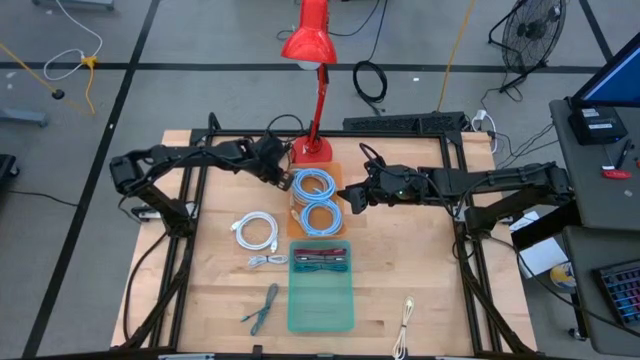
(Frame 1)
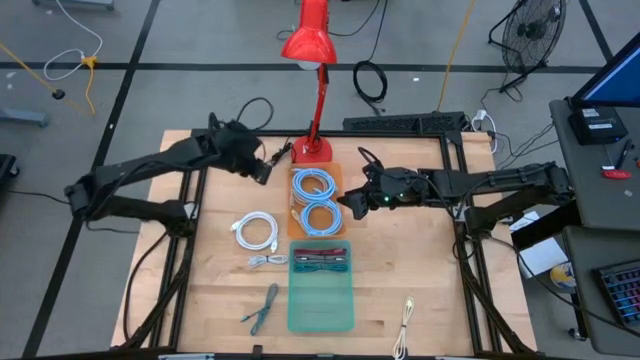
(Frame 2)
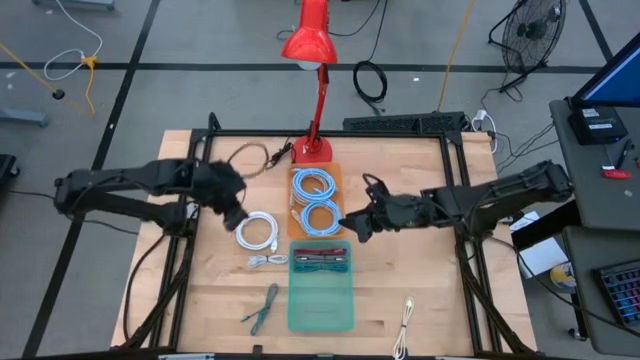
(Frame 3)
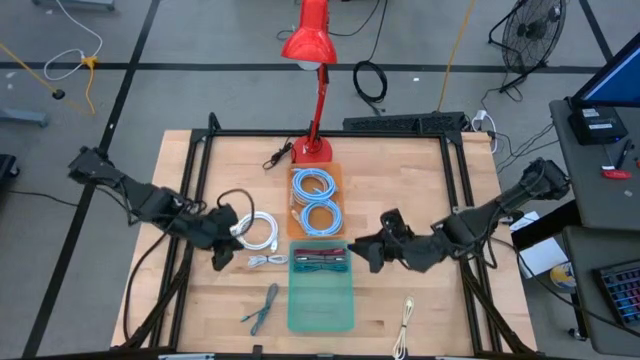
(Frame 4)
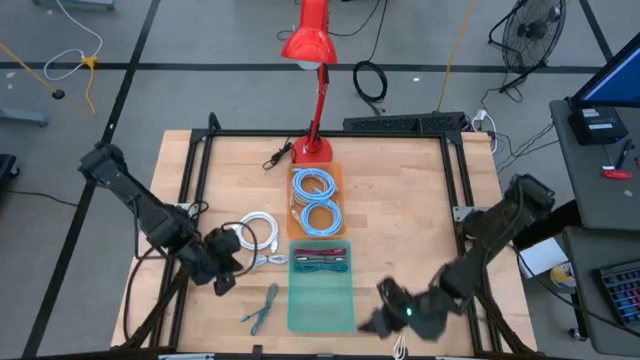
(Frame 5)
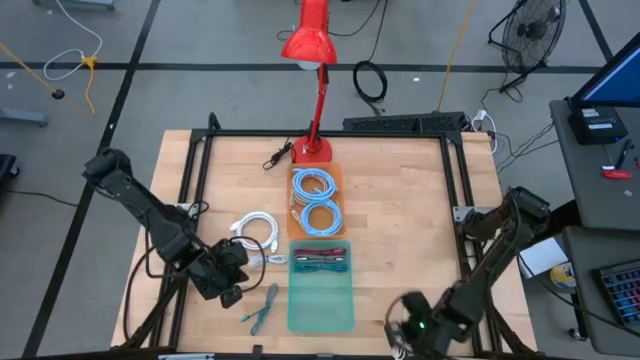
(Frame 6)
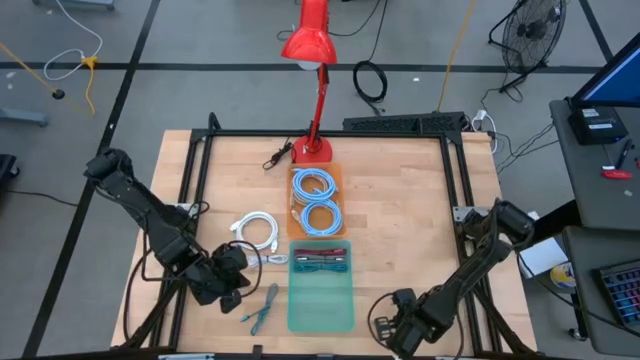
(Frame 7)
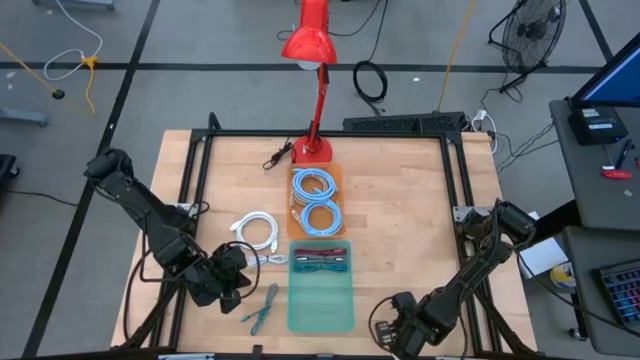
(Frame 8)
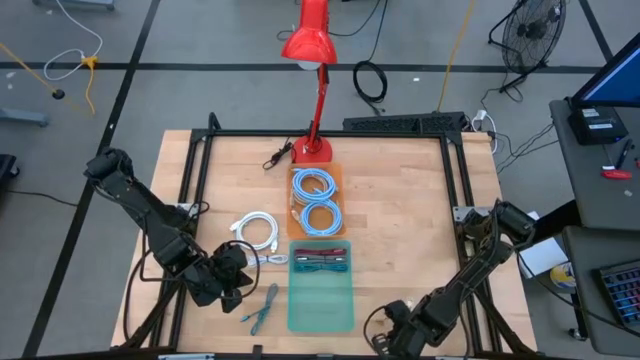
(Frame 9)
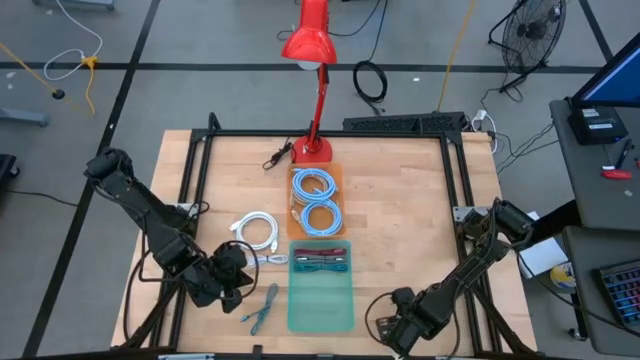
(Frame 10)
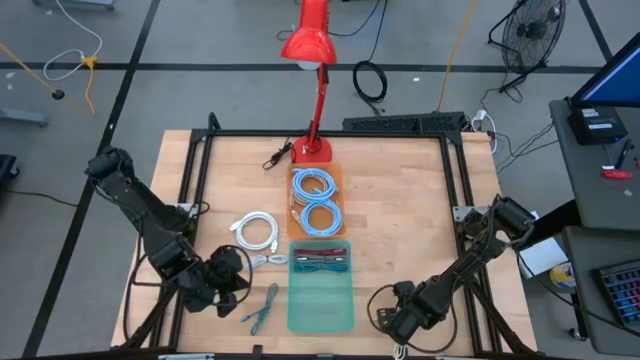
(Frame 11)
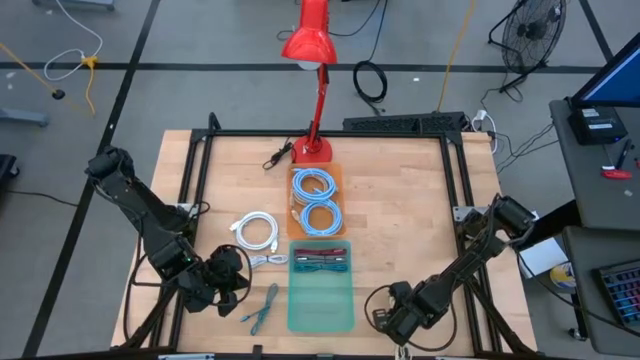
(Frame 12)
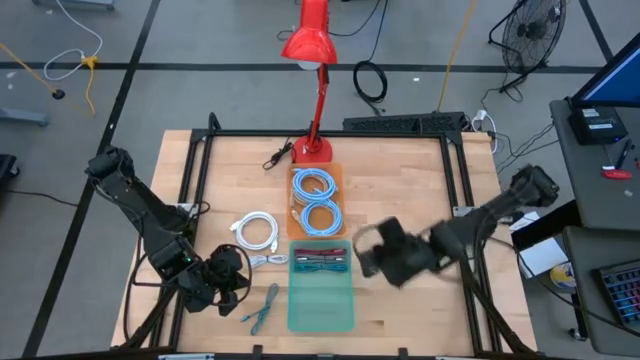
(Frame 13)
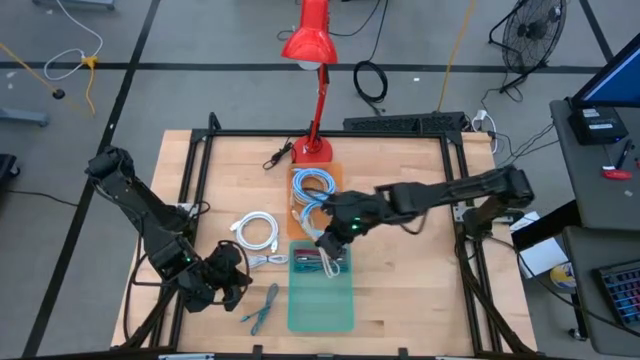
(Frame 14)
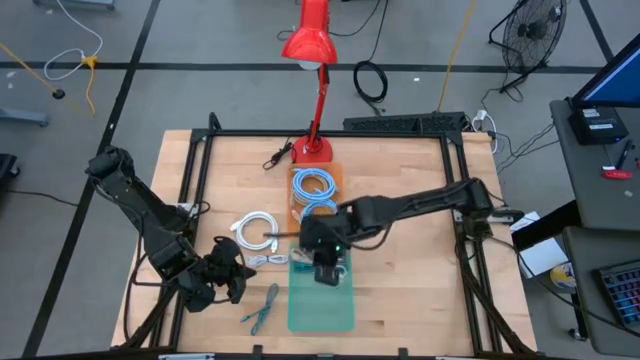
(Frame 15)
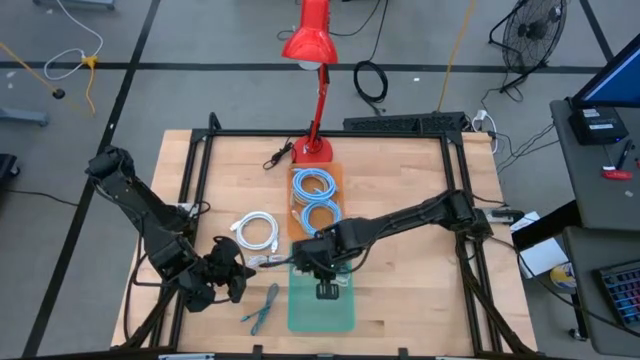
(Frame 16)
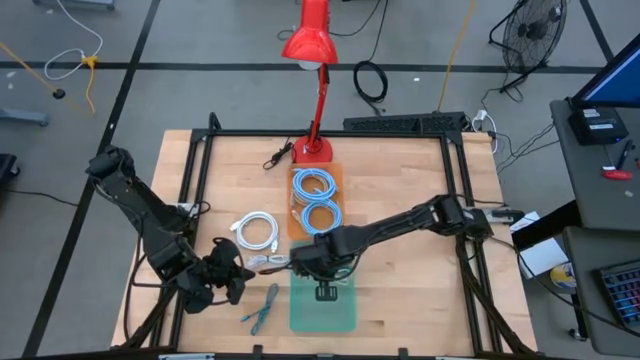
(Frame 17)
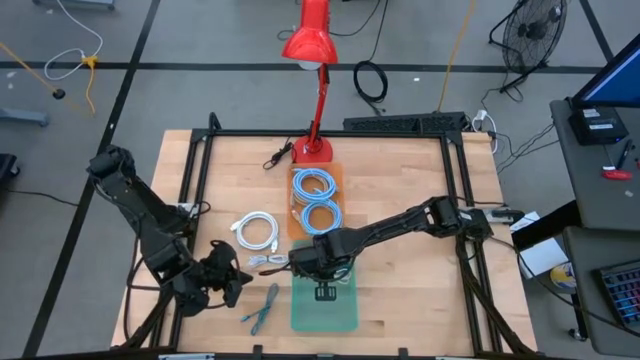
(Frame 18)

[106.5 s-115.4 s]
Task: Sort cables
Put the yellow charger cable into the blue bin

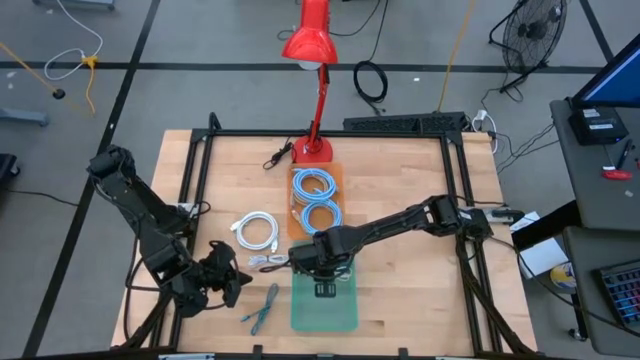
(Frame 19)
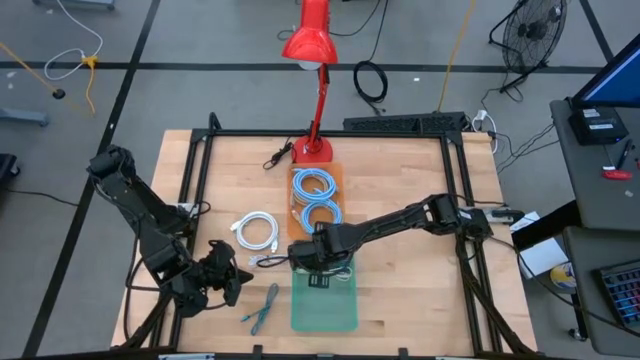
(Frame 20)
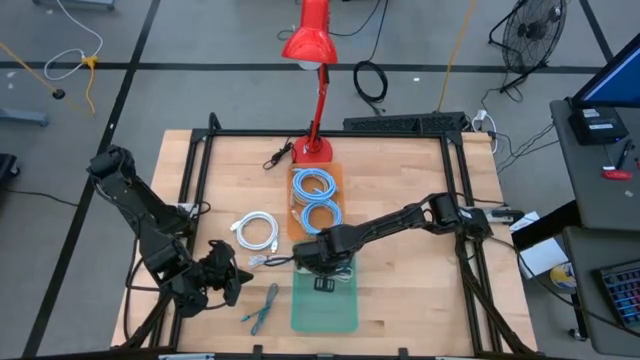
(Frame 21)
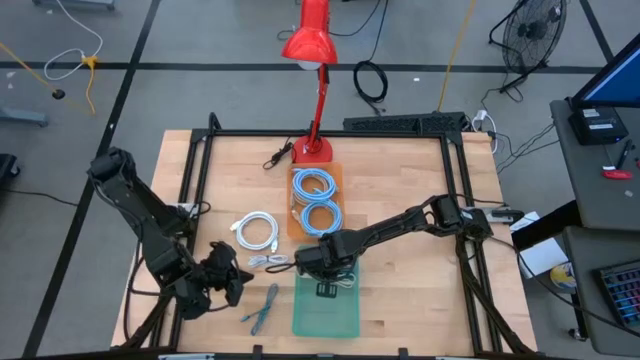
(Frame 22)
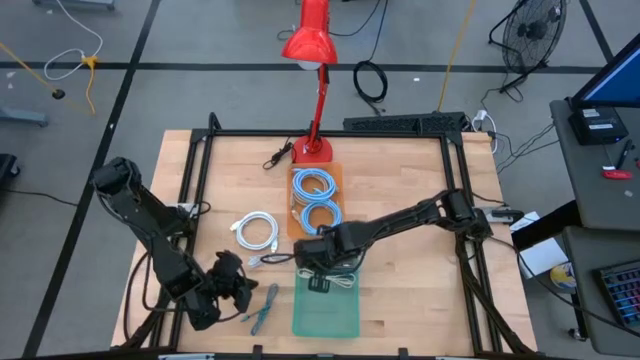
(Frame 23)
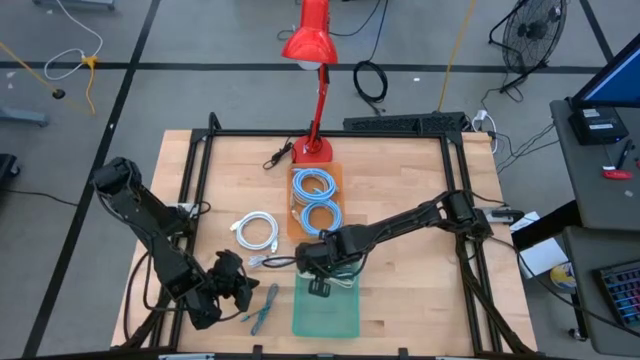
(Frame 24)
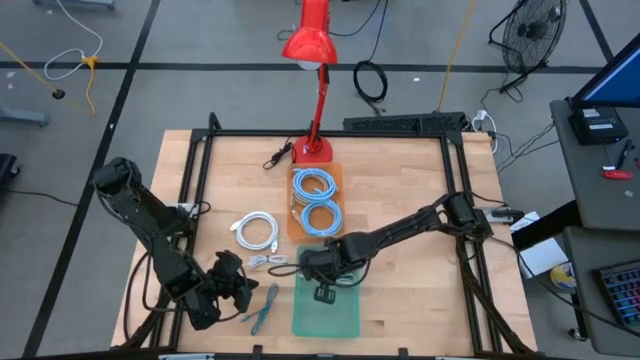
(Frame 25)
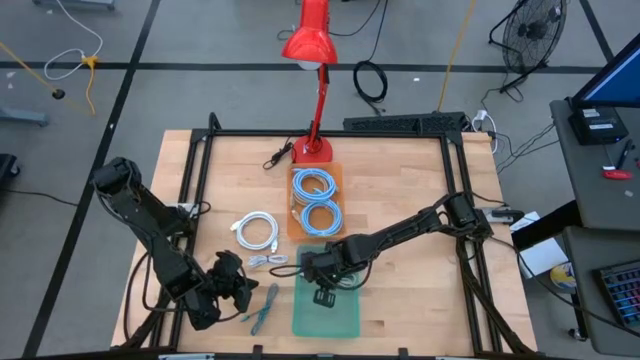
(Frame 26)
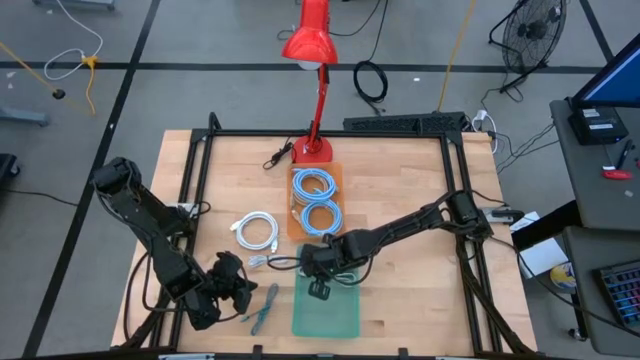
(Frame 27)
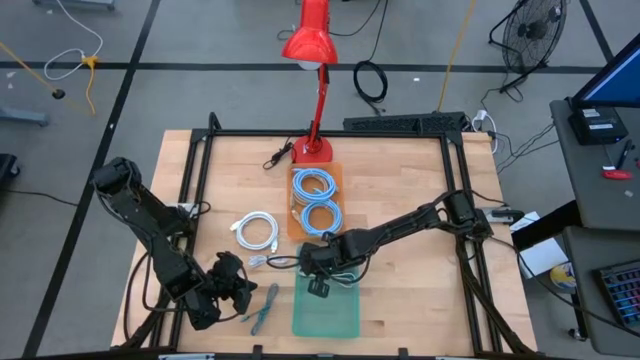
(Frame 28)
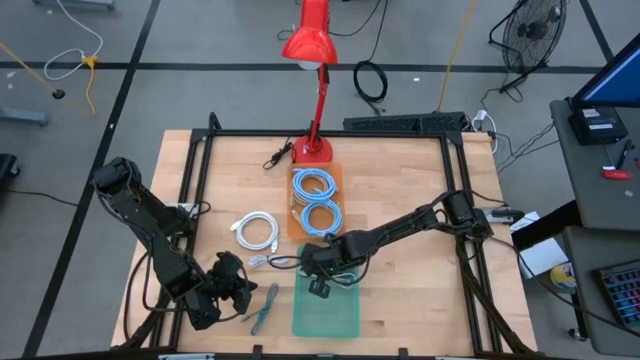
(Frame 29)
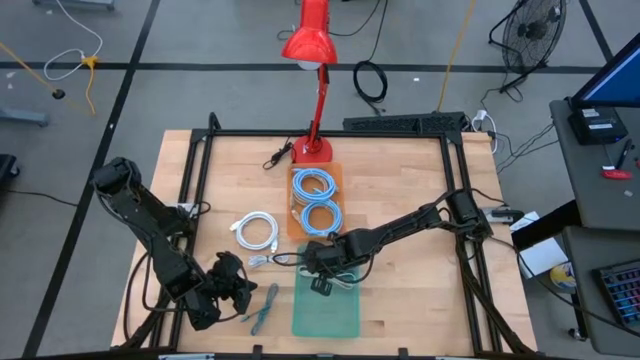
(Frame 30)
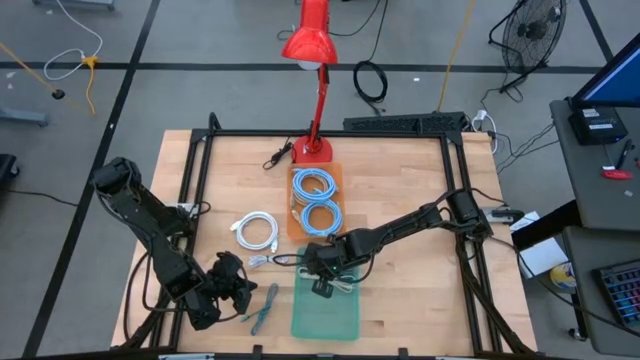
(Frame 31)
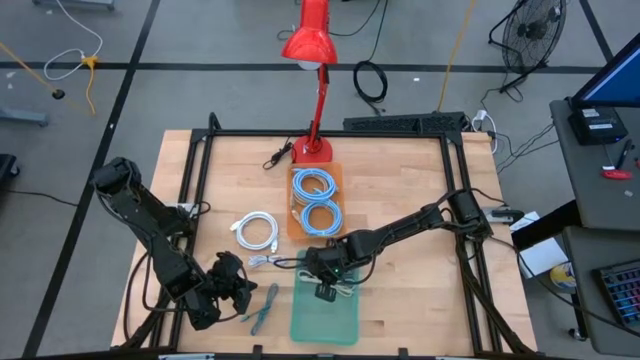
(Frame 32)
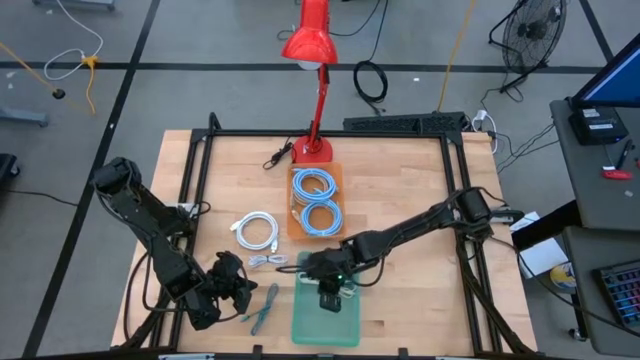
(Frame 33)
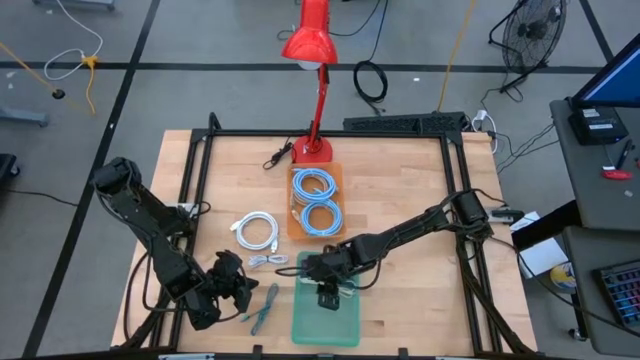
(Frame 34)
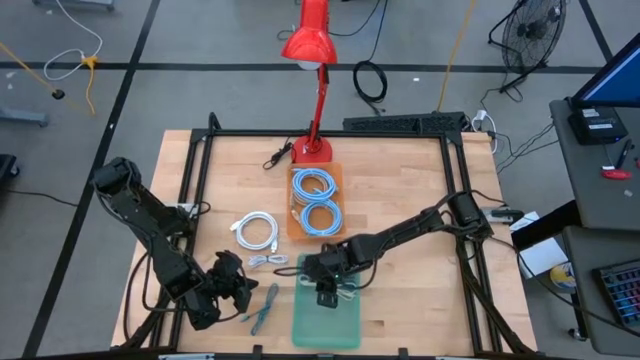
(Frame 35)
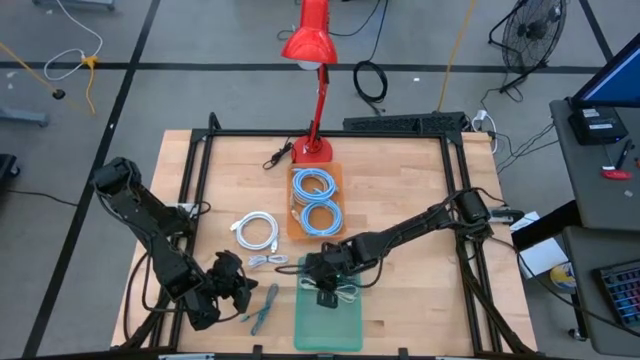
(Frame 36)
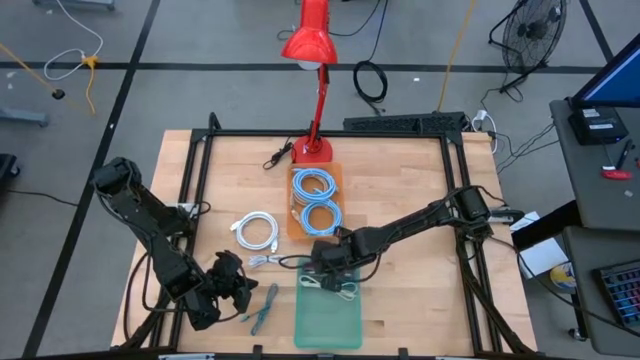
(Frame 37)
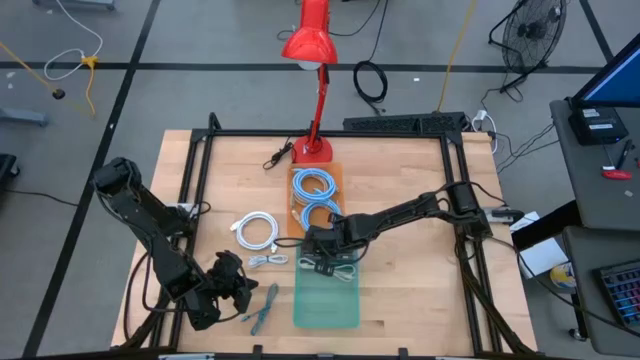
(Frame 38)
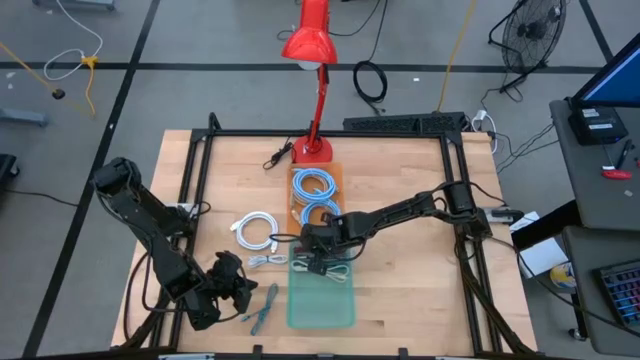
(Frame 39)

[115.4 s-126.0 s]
Adjust the charger cables in the blue bin

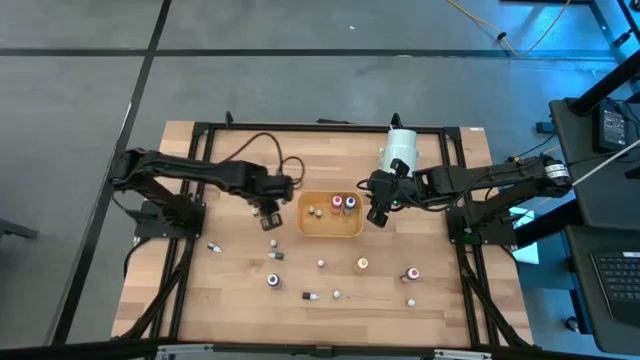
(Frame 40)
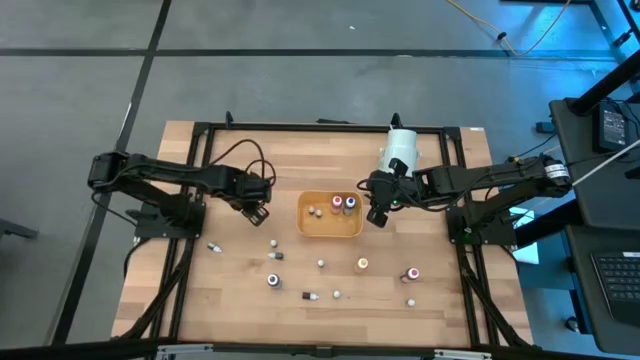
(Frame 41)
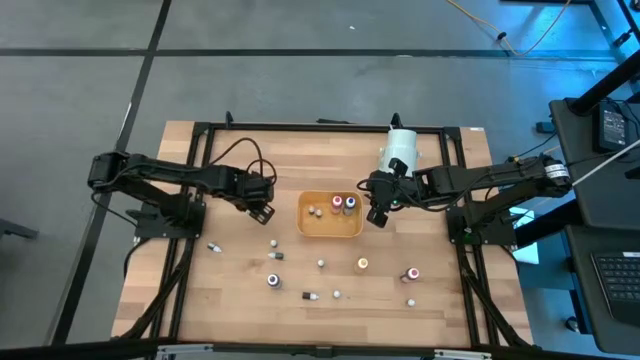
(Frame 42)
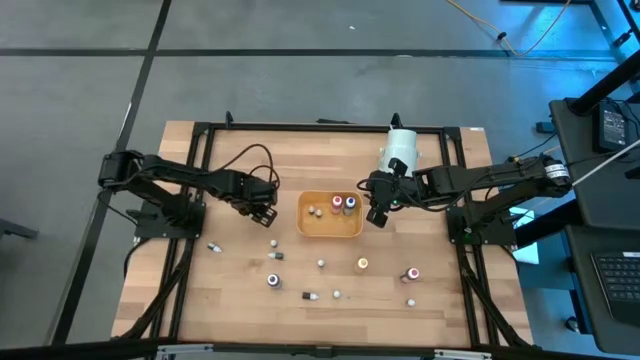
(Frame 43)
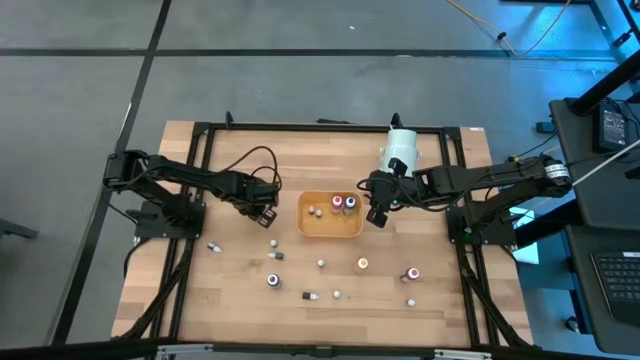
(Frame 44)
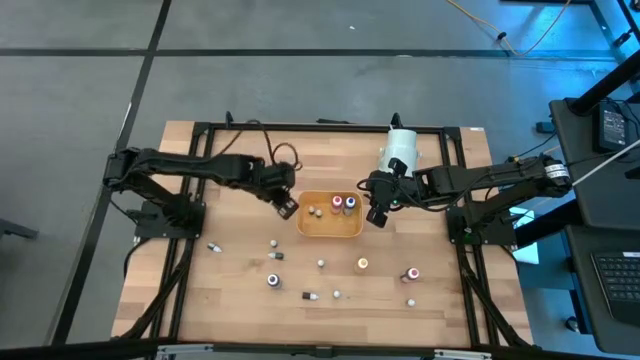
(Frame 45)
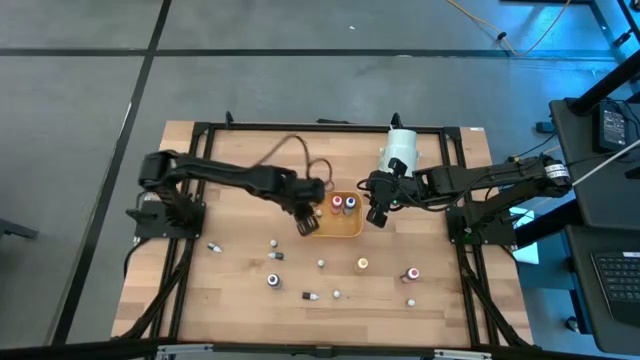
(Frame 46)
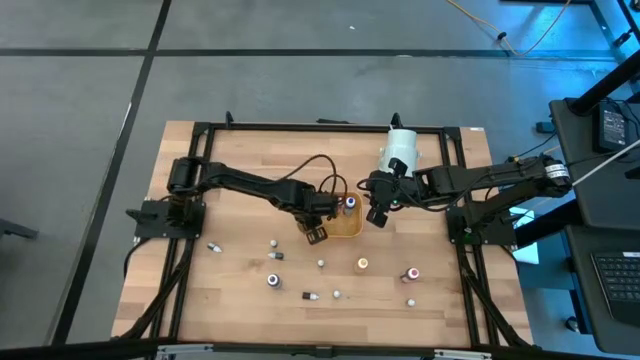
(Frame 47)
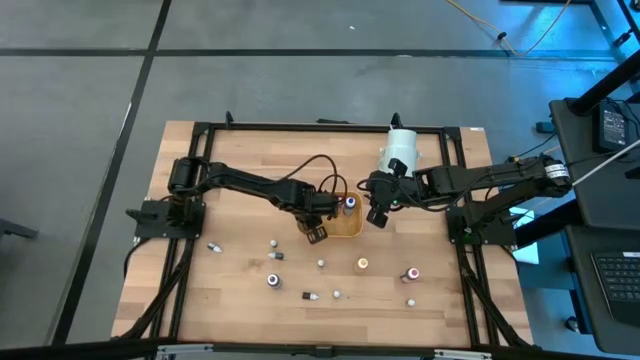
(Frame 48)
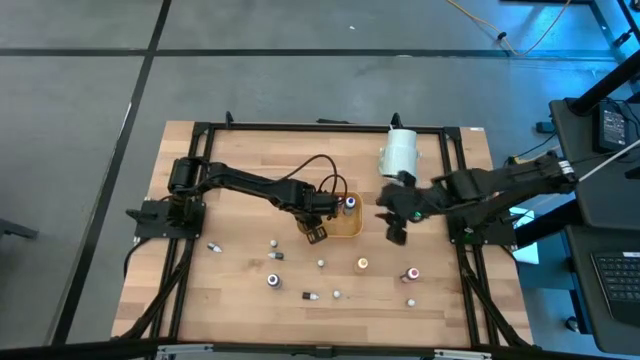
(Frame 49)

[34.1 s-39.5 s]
Task: Pick & Place food coloring
Put the top small blue food coloring bottle into the yellow bin
